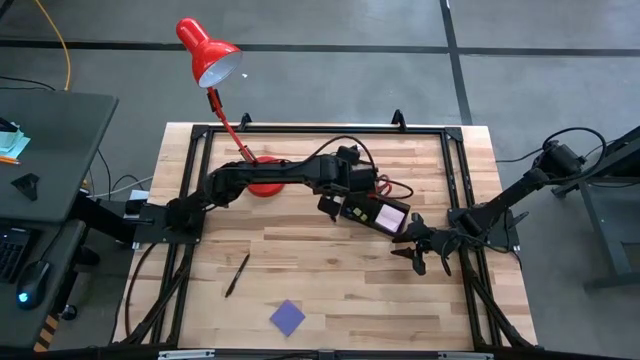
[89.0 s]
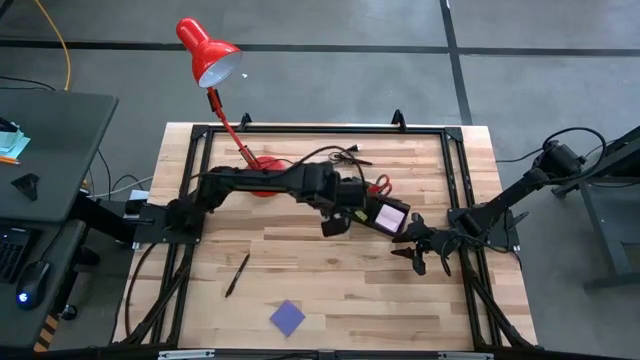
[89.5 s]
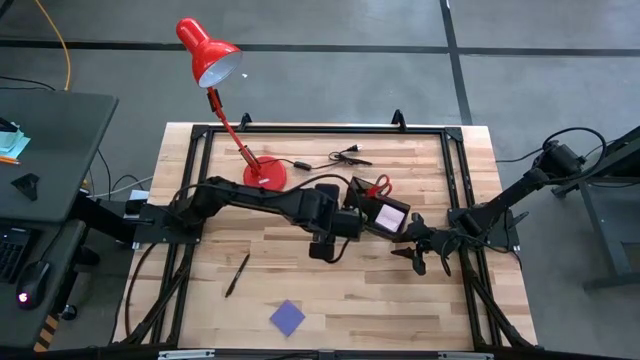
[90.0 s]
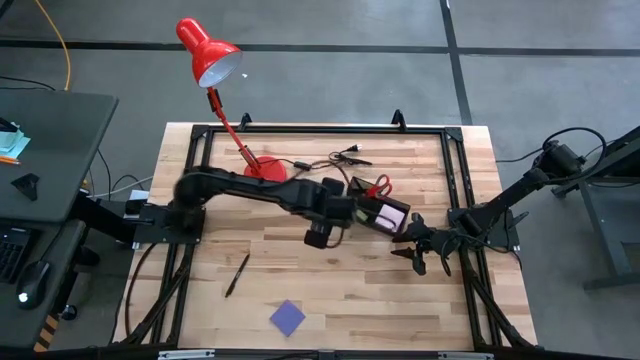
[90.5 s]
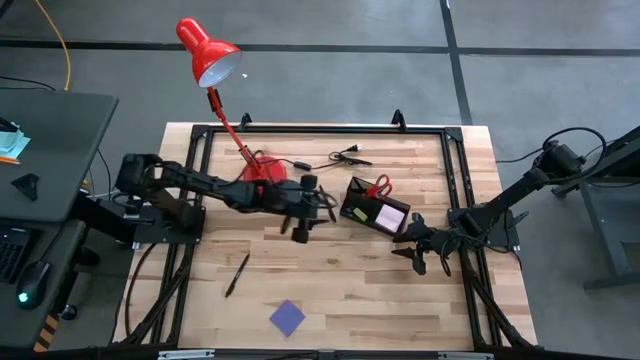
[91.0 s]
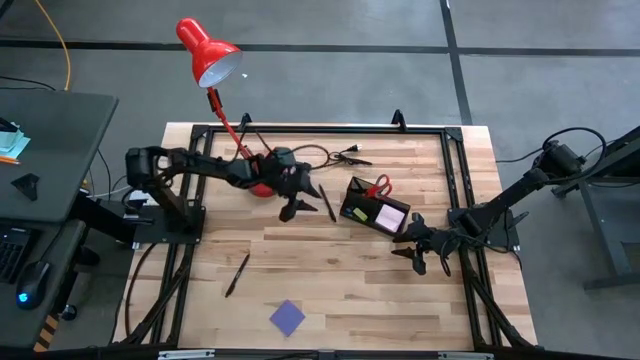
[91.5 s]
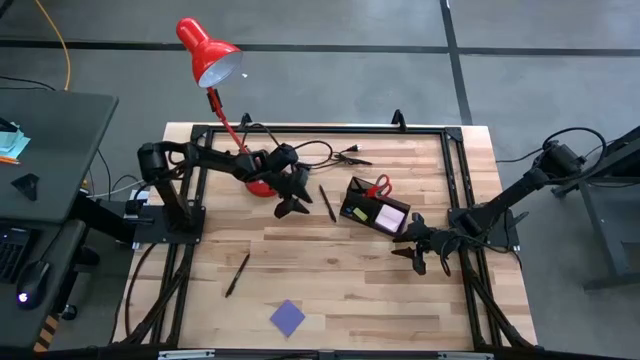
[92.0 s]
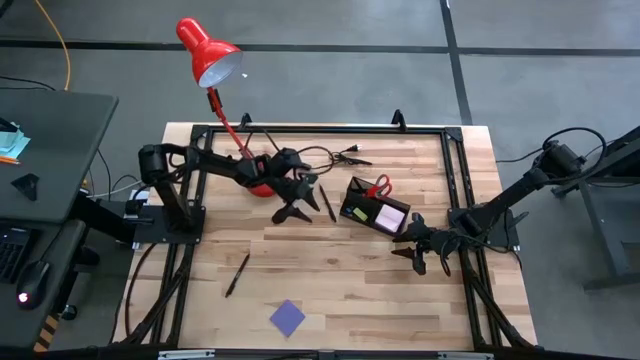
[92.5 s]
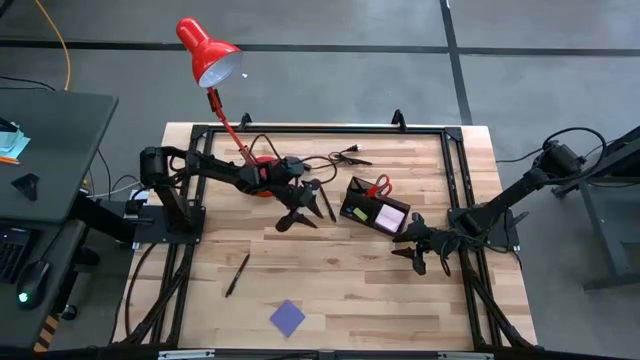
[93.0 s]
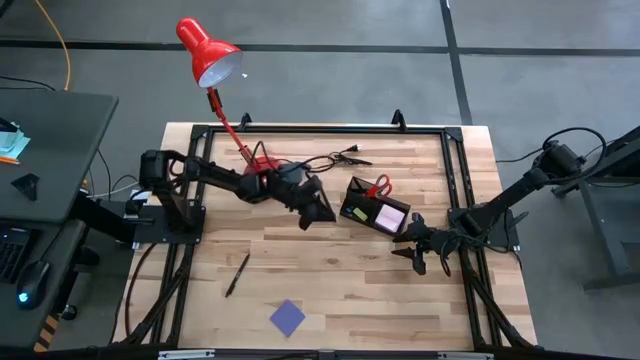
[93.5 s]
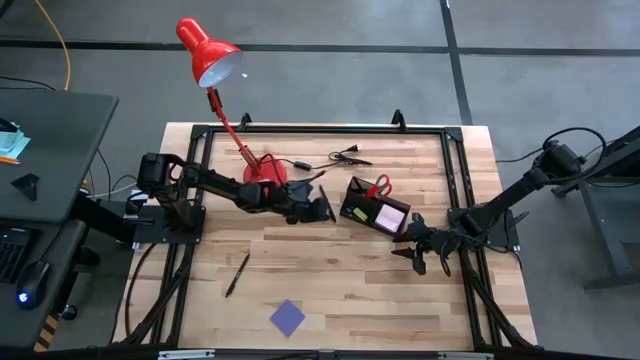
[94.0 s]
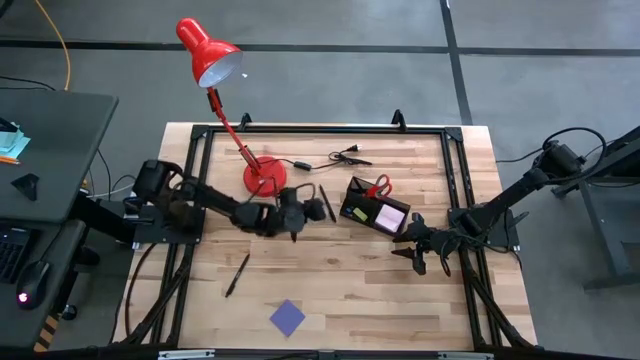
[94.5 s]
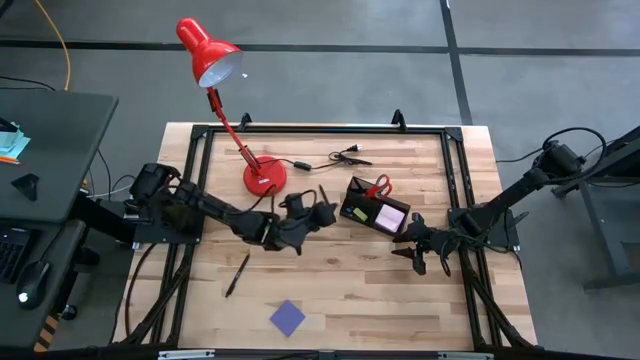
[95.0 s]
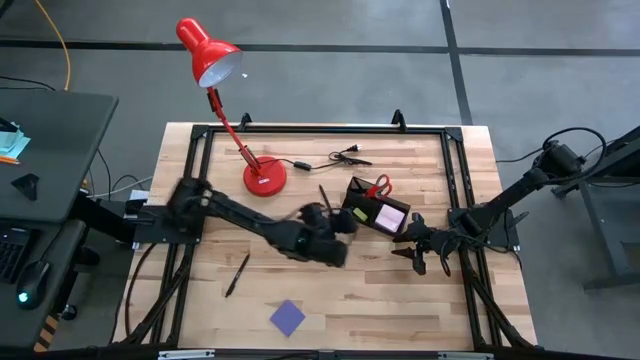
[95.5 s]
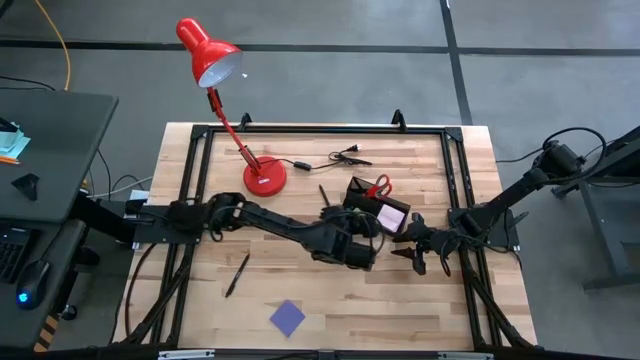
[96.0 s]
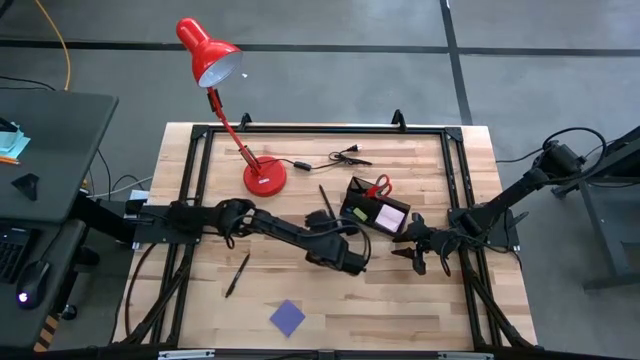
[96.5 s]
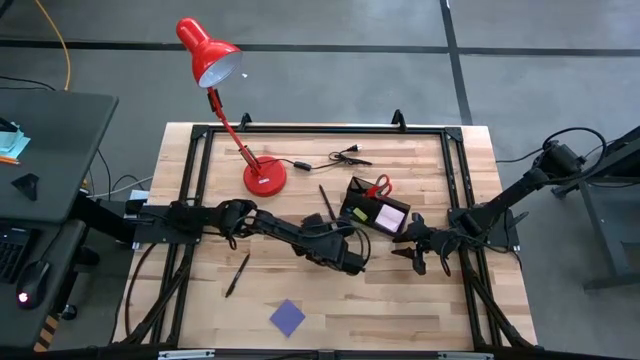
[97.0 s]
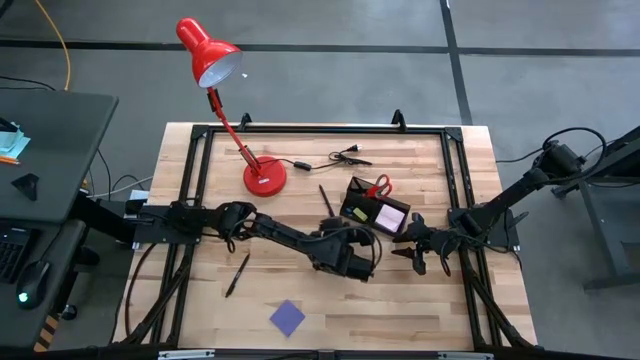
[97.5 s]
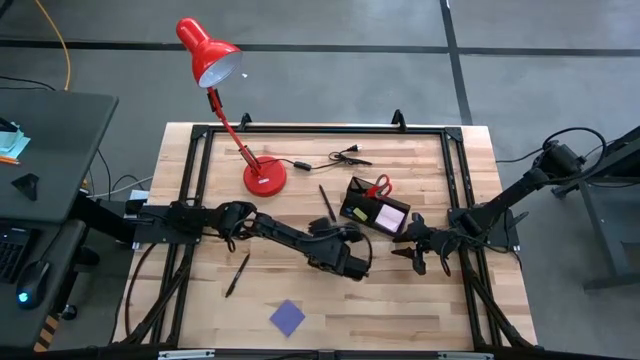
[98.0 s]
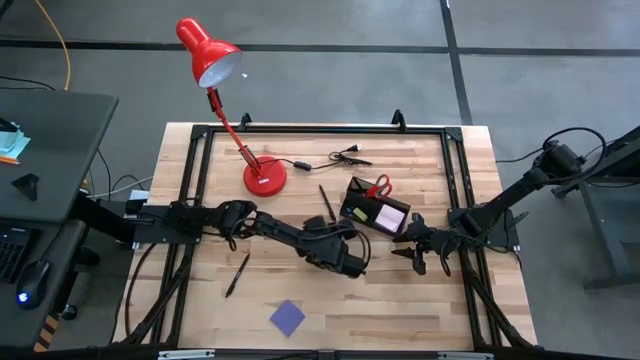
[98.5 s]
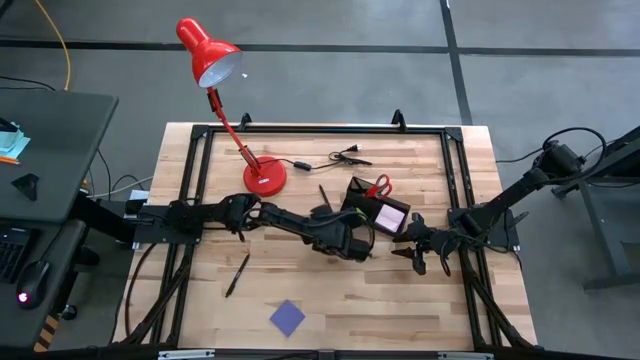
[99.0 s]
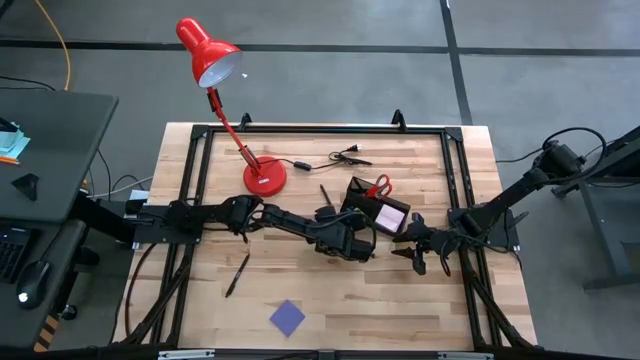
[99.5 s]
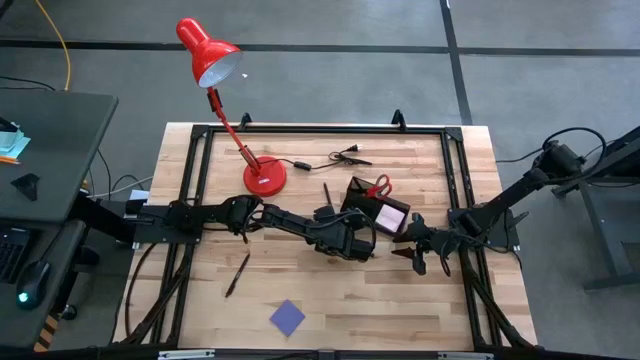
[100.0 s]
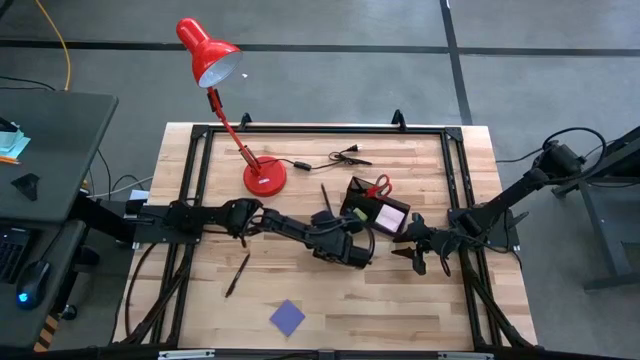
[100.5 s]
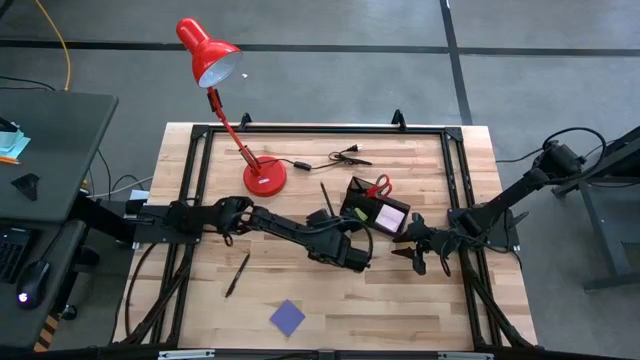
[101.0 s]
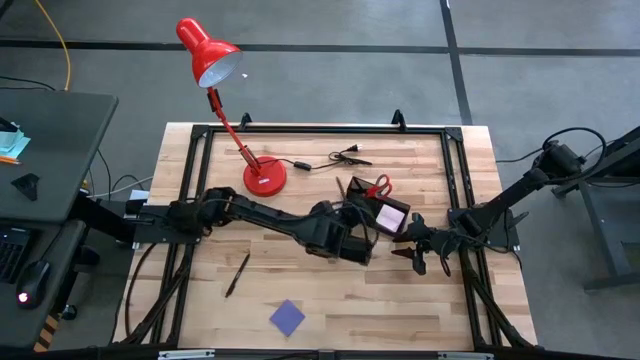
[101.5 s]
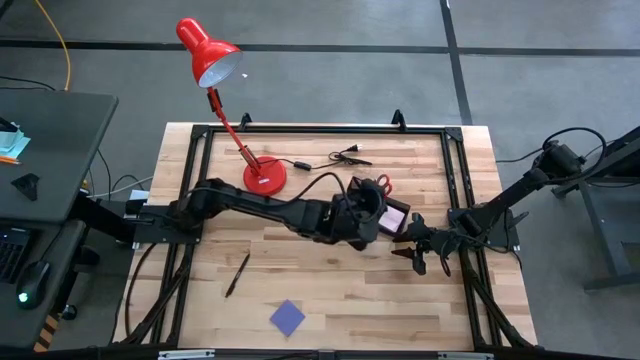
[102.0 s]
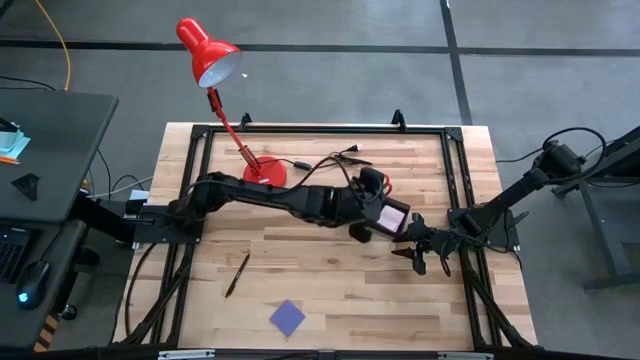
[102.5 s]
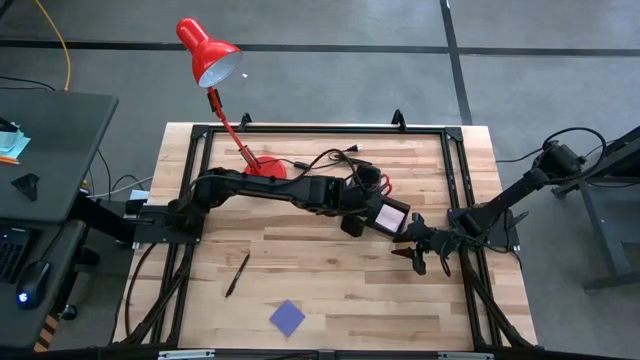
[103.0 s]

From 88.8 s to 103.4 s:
Task: Pick and place office supplies into organizer
Put the black pen into the desk organizer

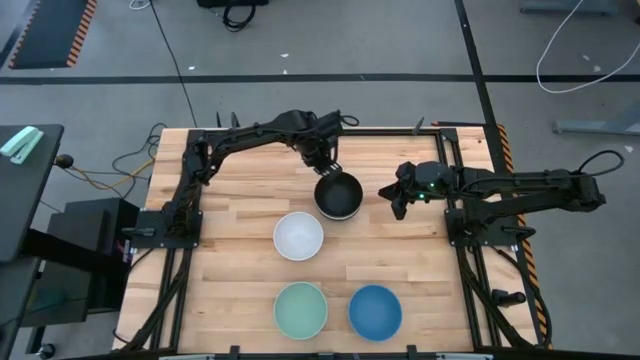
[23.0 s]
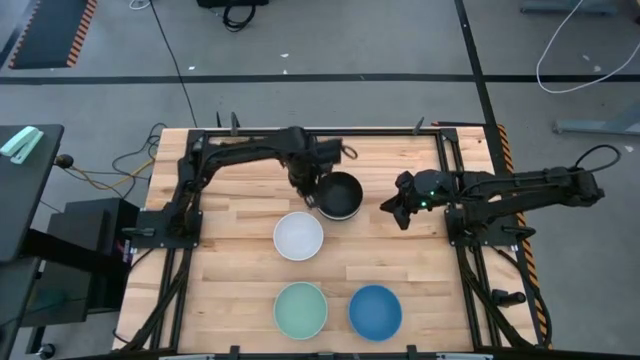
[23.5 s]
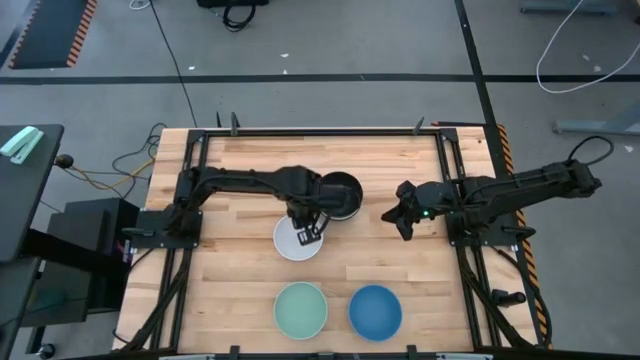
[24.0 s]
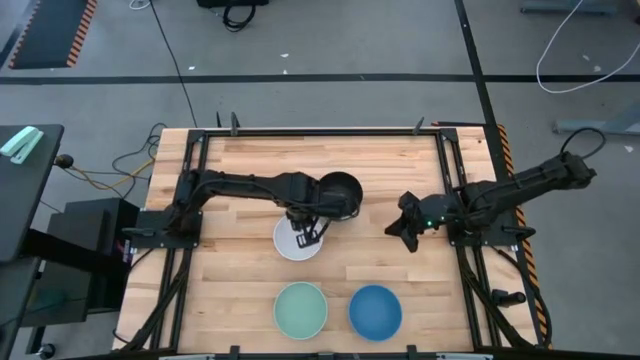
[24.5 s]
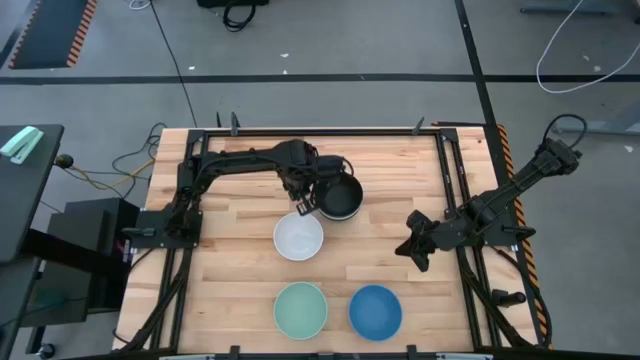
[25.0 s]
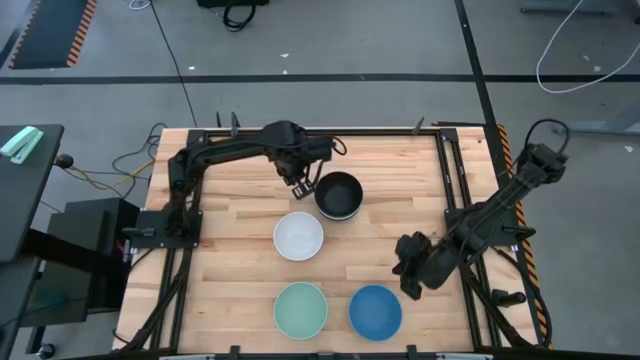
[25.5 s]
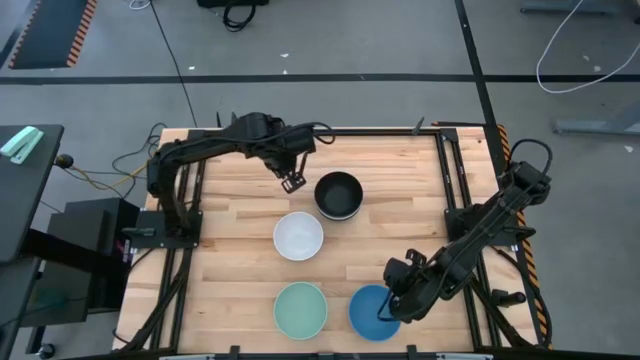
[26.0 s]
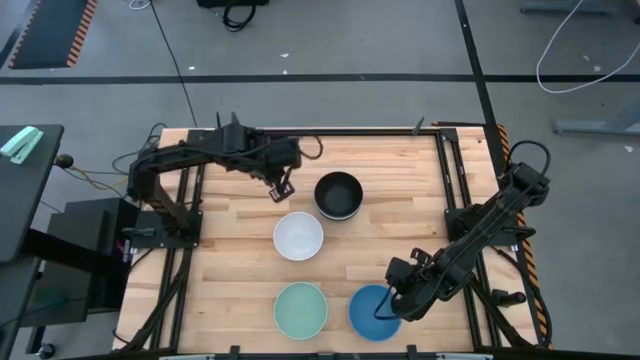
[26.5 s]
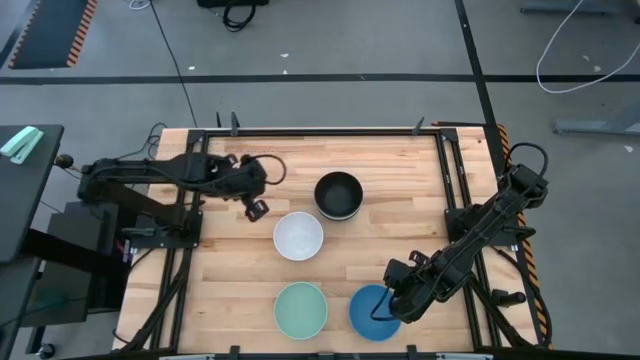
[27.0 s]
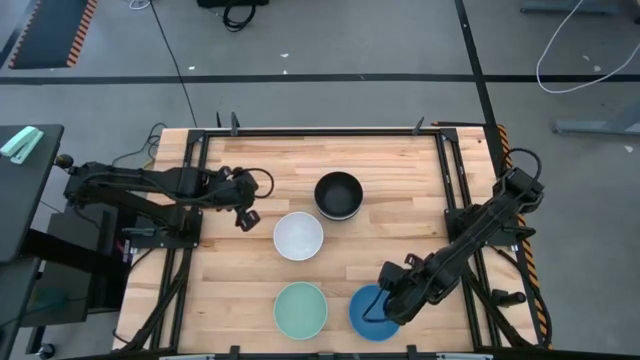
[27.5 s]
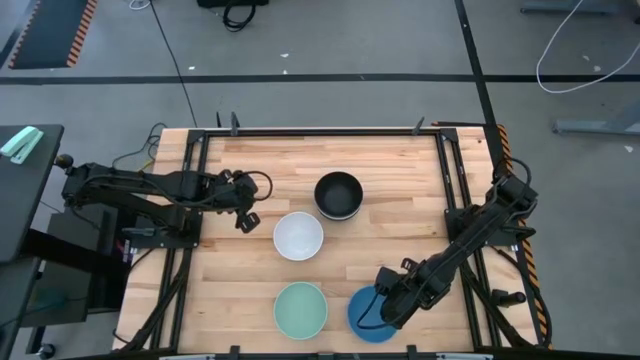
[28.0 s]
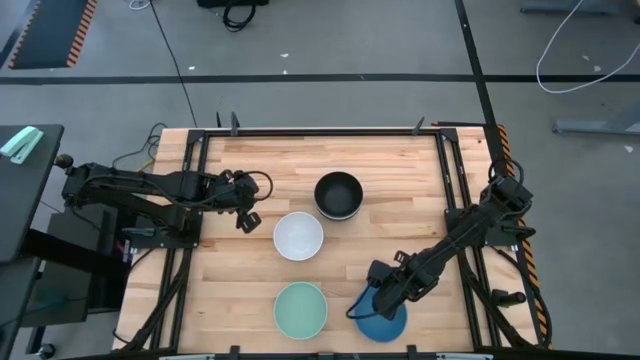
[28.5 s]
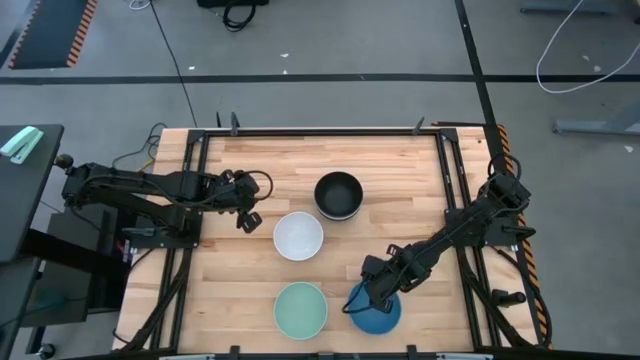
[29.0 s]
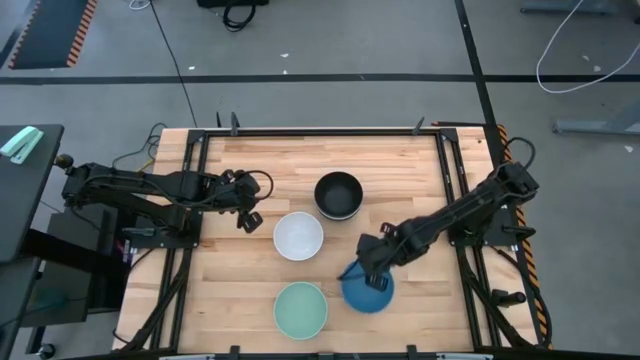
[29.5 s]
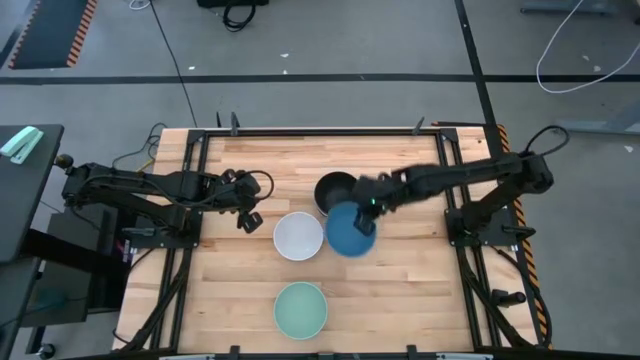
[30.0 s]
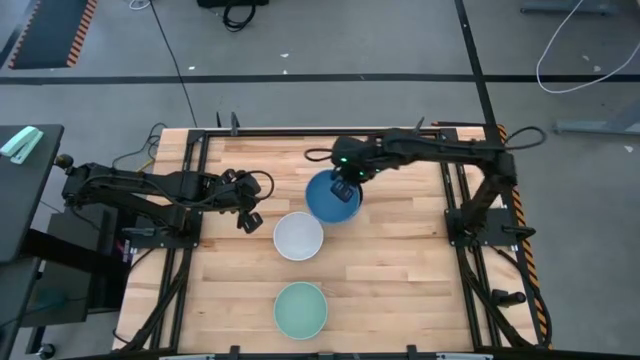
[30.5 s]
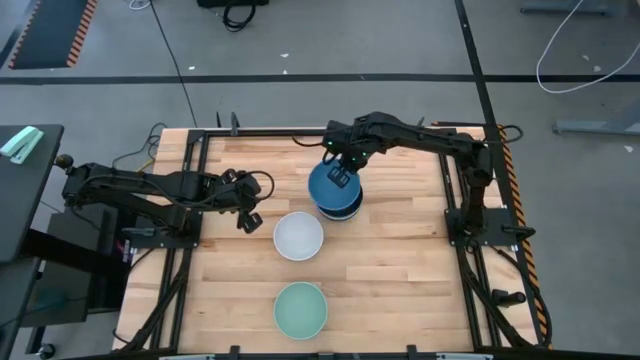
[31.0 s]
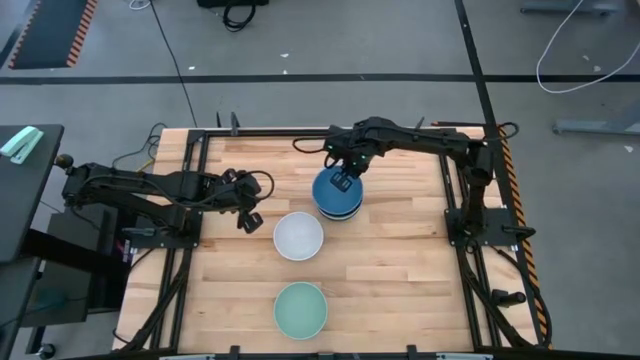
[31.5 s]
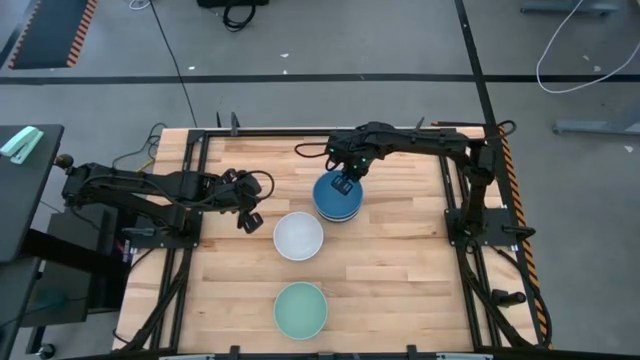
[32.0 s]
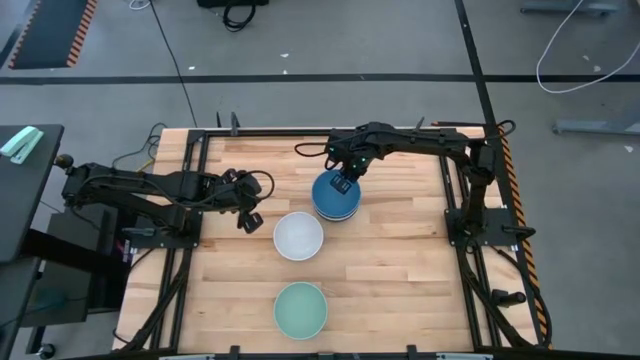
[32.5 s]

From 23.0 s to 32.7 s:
Task: Nest bowls inside each other
Stack the blue bowl on the black bowl
